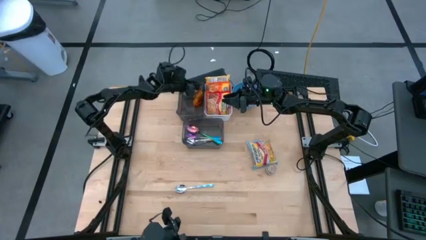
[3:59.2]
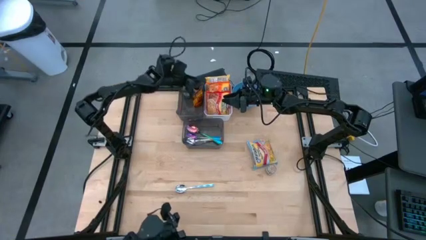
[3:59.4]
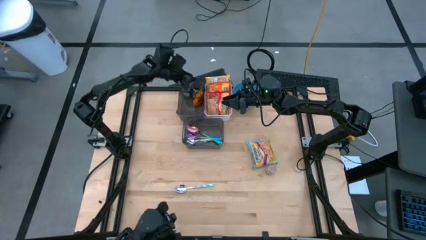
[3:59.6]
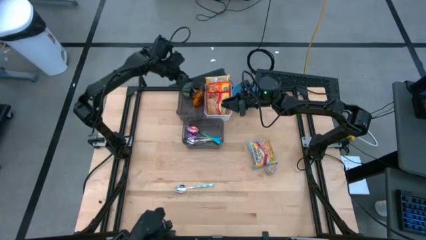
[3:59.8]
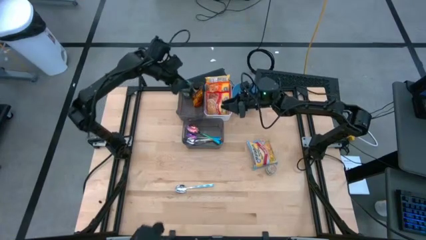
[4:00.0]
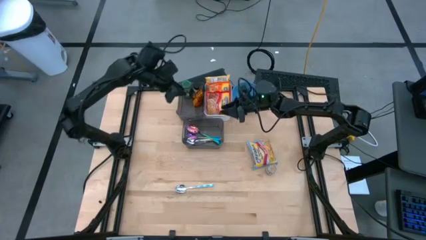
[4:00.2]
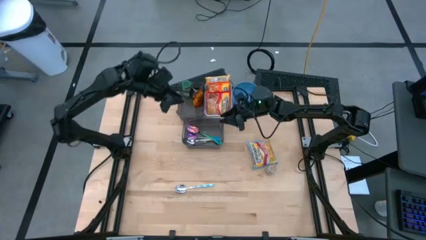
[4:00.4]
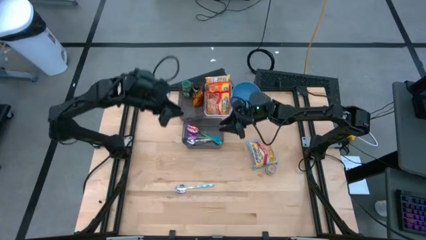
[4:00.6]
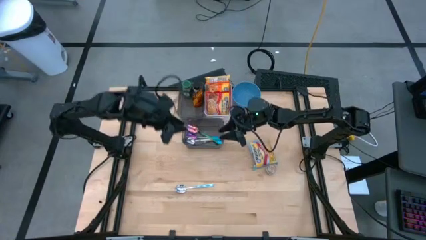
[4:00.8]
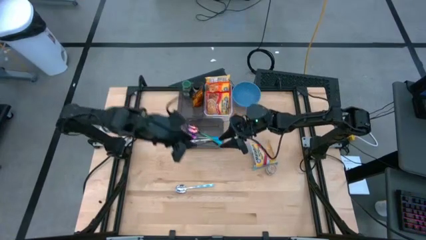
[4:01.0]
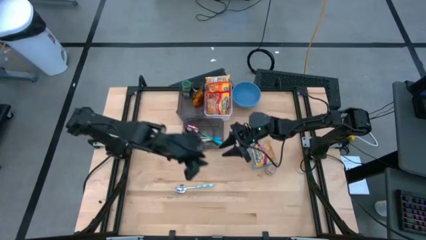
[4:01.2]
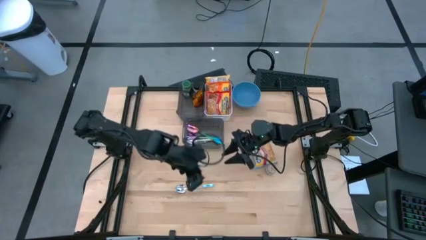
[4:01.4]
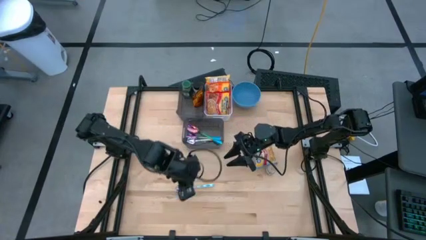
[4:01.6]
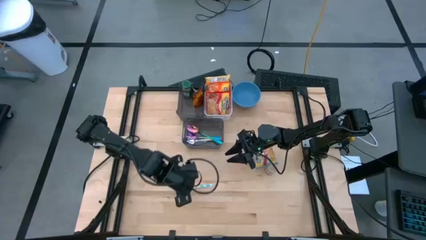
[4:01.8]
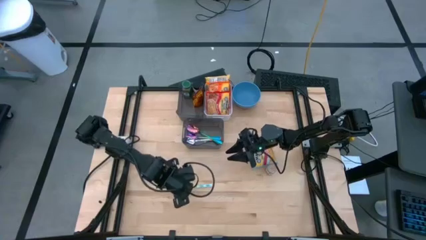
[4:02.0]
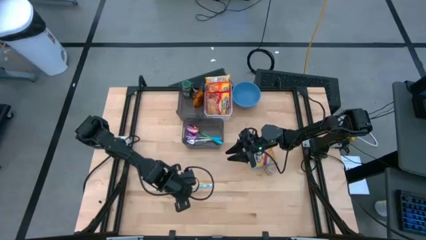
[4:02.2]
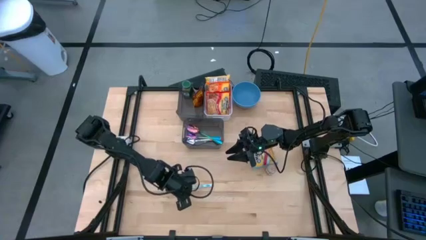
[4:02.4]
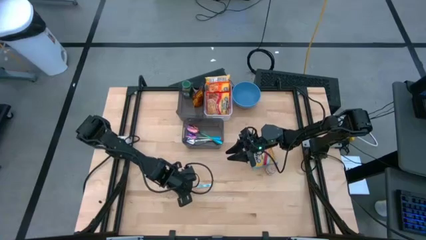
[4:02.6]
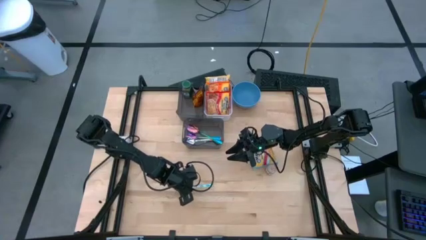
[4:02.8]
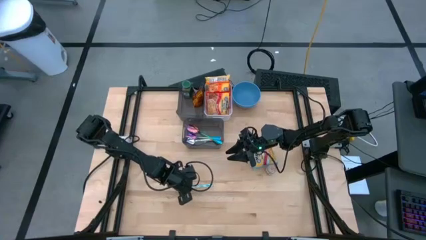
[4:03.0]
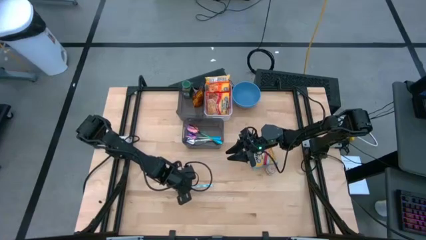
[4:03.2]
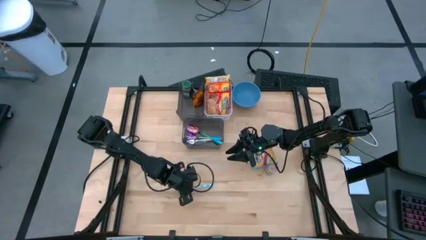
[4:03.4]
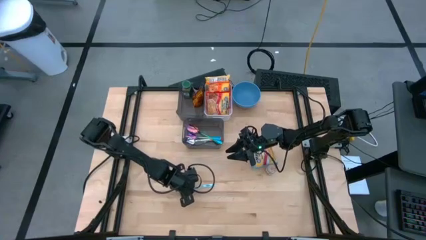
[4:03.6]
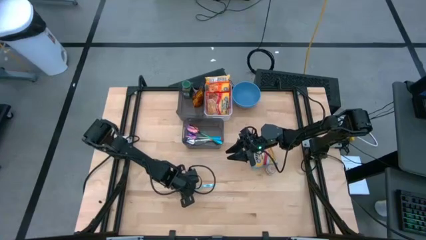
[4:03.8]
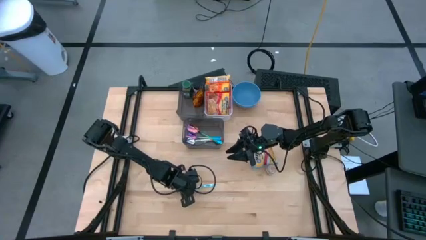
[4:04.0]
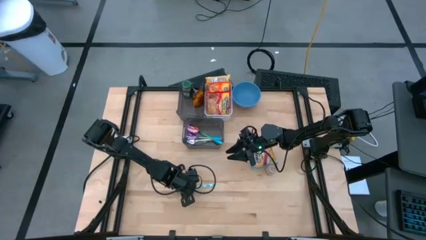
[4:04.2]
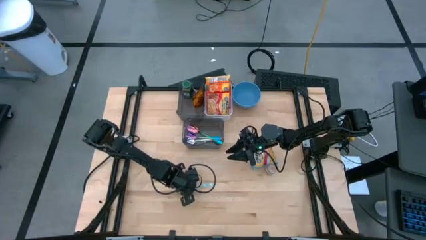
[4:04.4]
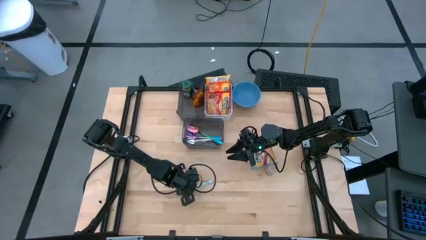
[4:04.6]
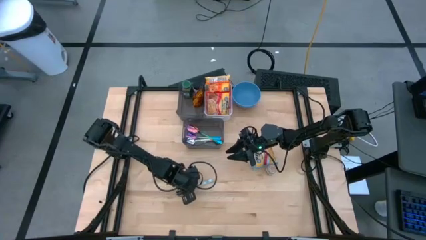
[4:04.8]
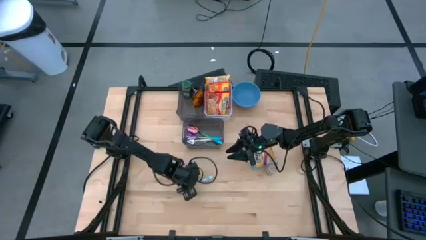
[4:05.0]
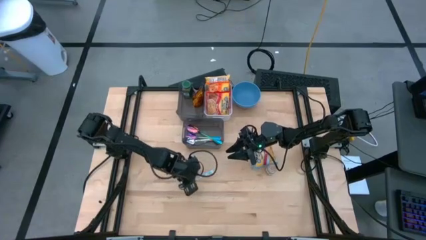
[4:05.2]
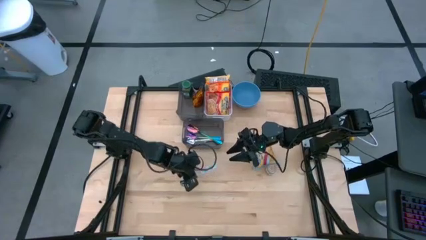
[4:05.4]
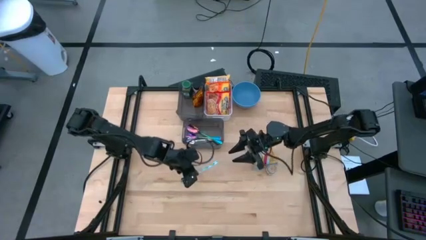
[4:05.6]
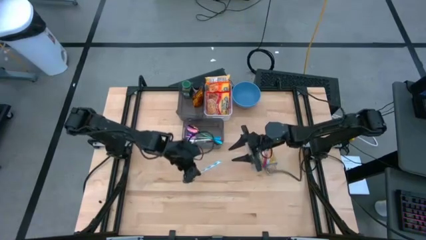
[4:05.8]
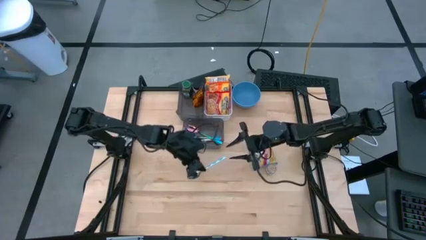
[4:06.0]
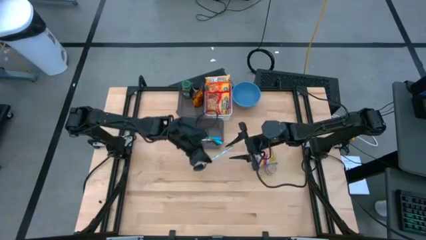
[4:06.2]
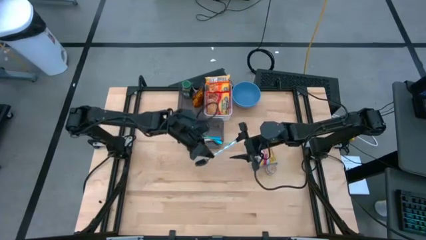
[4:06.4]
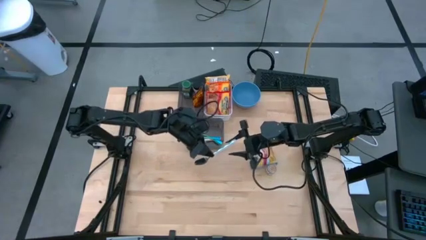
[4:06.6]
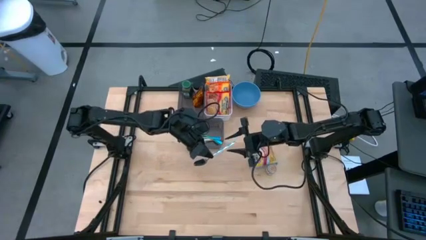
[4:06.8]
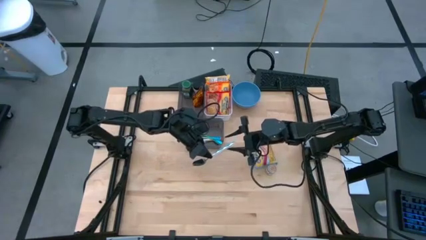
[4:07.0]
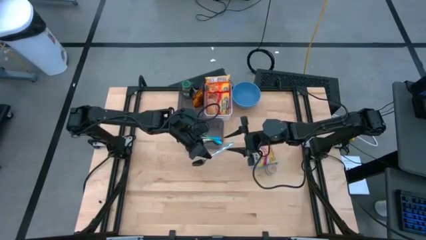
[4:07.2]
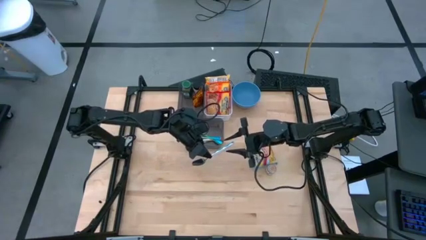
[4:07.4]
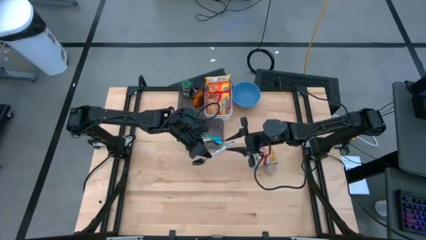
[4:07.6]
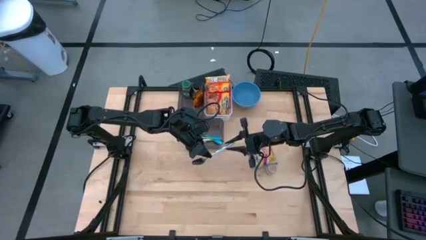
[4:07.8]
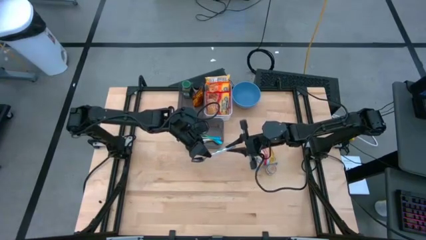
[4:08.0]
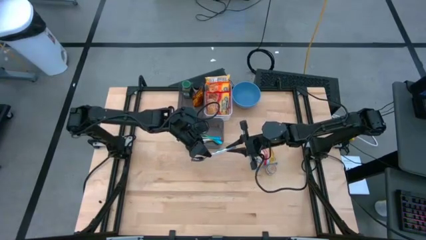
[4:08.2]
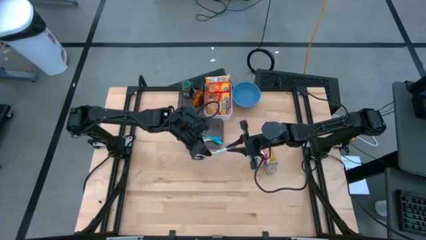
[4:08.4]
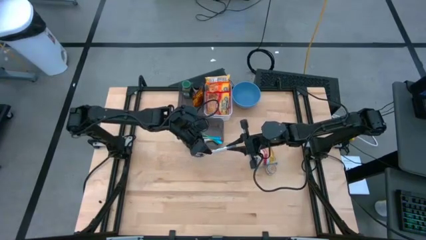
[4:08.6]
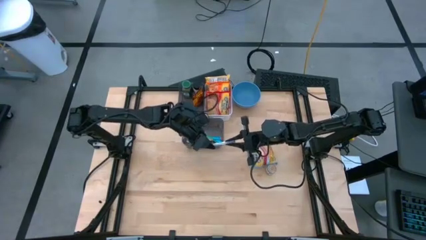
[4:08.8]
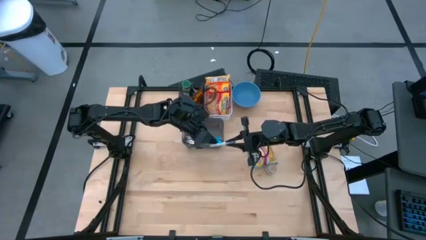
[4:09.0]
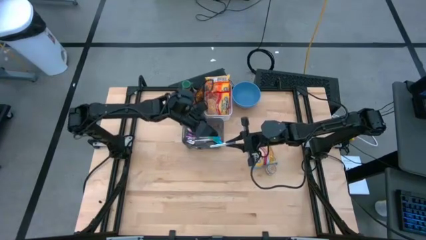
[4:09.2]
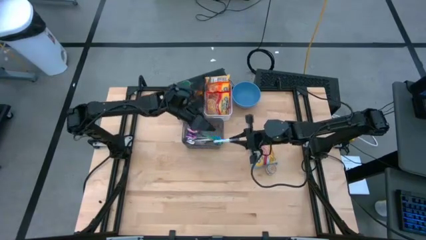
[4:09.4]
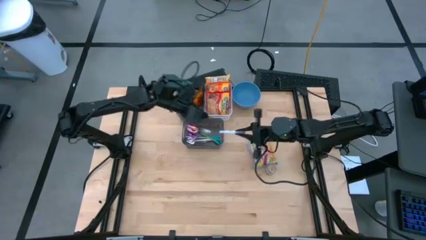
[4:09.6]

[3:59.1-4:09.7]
Task: Pick & Place Food Item
Put the blue patterned spoon into the bottom black bin

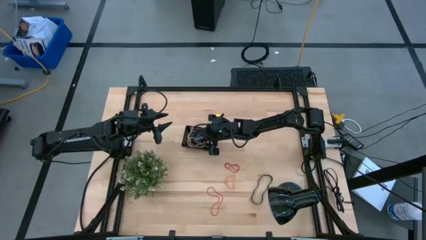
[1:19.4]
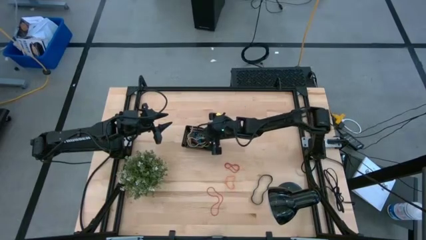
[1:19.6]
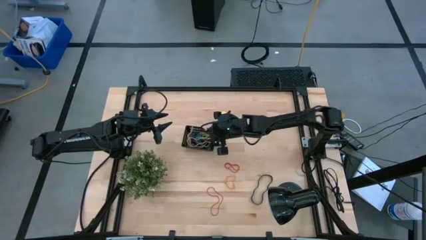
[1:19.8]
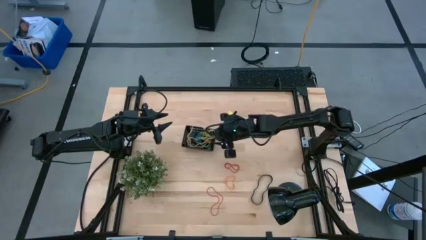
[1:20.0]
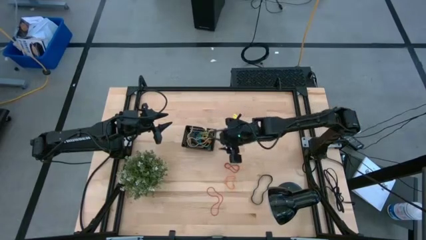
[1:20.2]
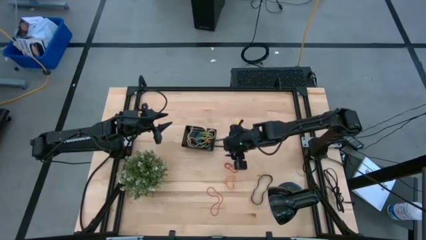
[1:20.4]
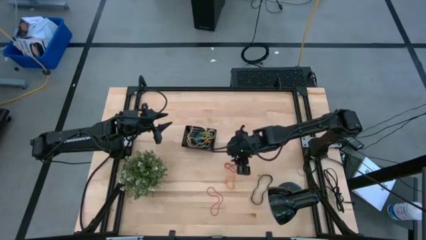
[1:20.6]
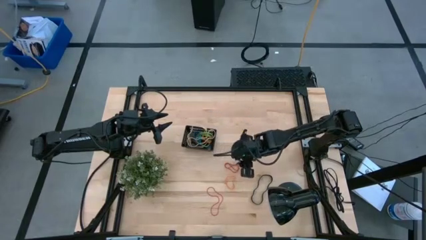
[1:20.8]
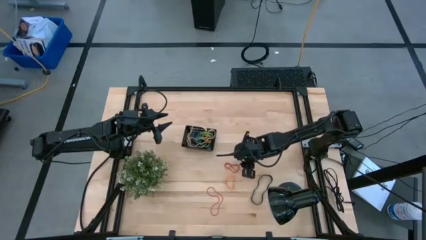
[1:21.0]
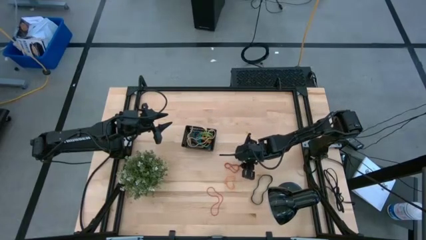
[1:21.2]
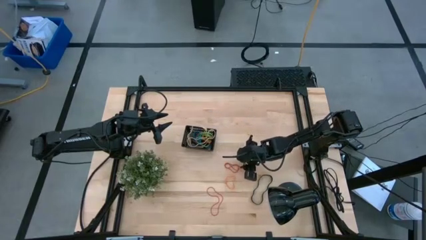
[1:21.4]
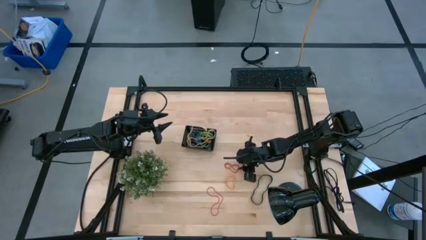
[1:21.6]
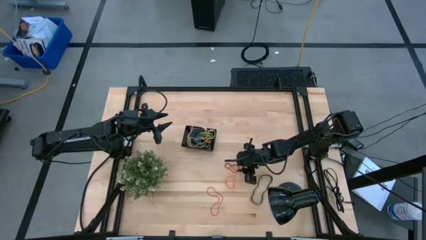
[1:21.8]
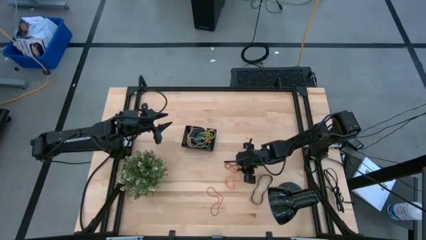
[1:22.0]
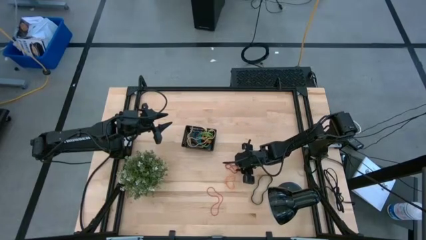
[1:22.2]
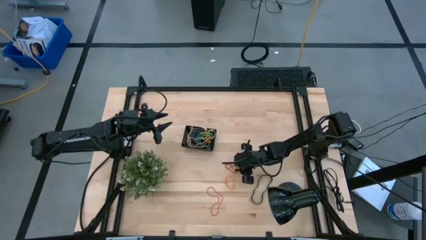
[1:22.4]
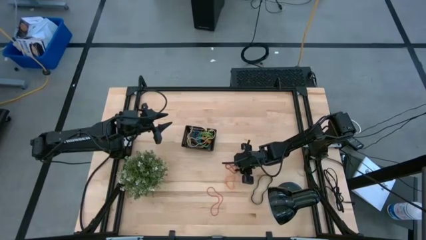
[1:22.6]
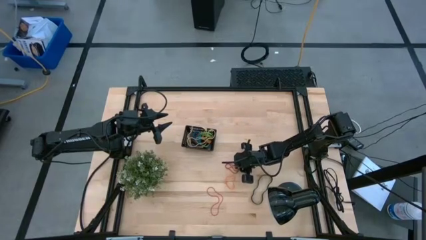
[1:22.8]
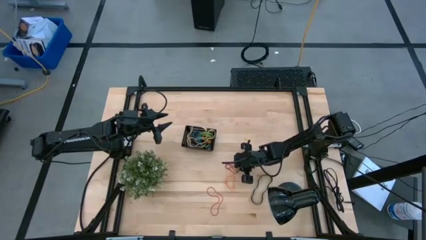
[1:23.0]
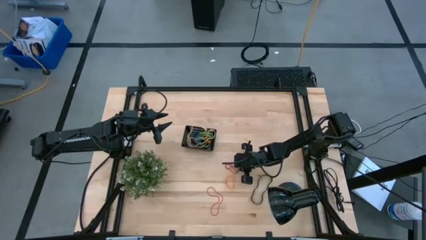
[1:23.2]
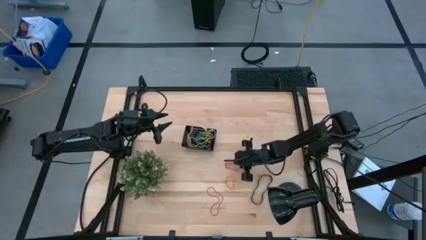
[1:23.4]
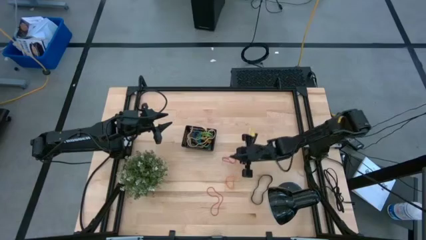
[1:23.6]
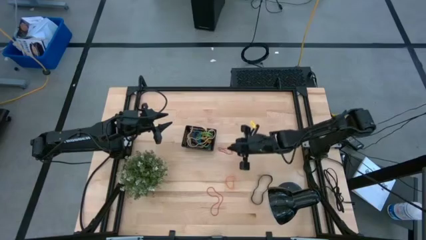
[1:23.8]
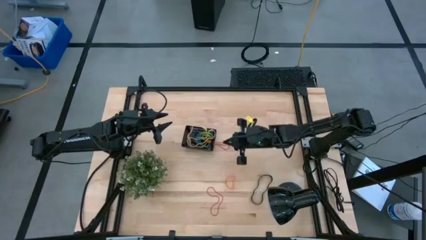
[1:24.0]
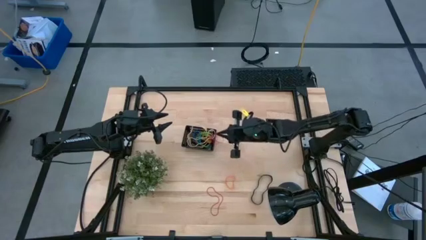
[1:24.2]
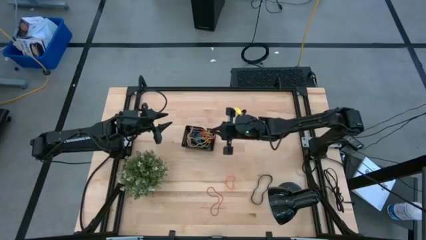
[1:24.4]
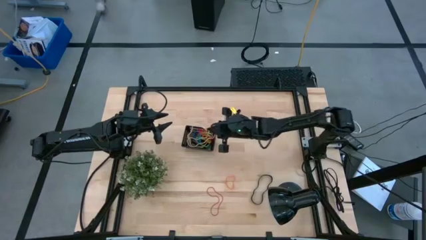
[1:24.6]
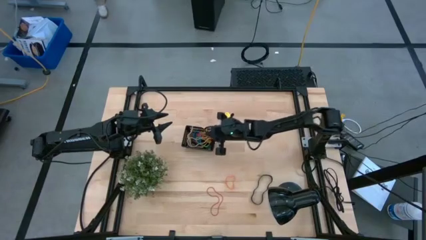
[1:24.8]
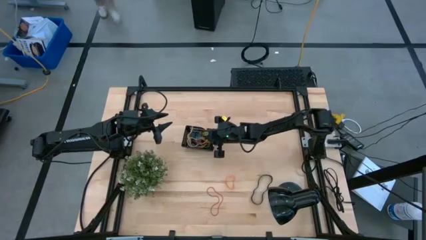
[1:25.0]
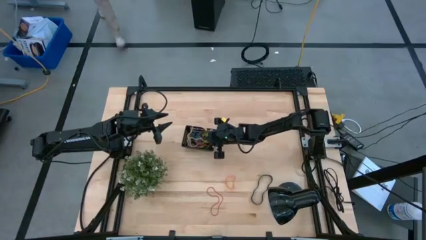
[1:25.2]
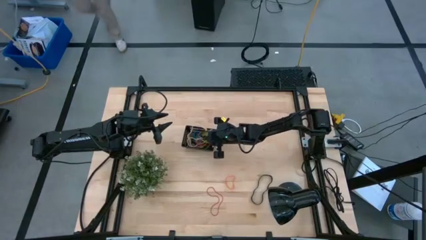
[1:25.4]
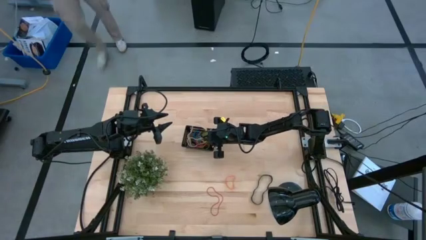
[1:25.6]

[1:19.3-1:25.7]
Task: Pick and place rubber bands into bin
Put the top red rubber band into the black bin
